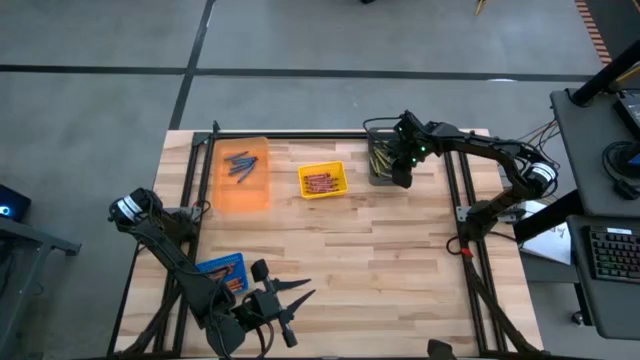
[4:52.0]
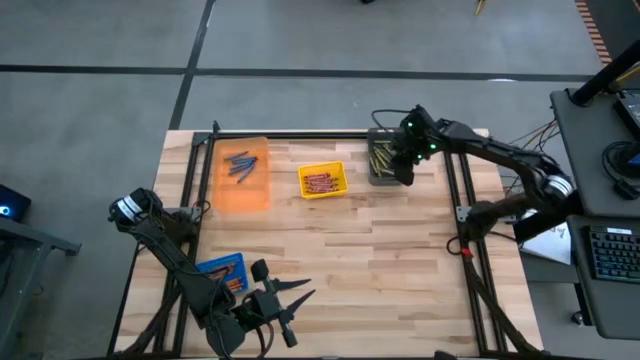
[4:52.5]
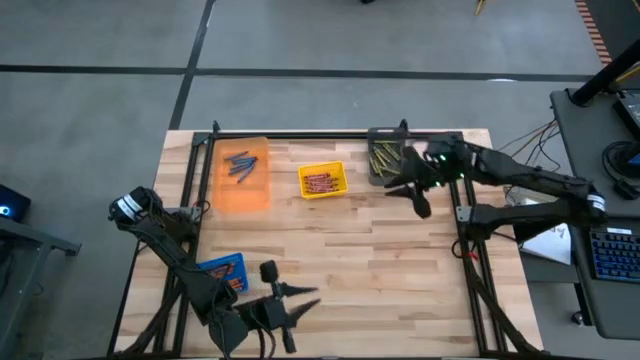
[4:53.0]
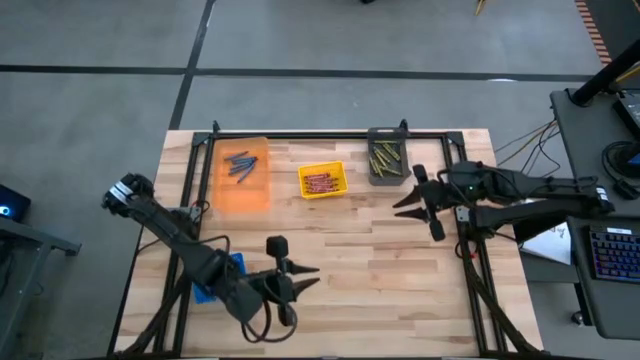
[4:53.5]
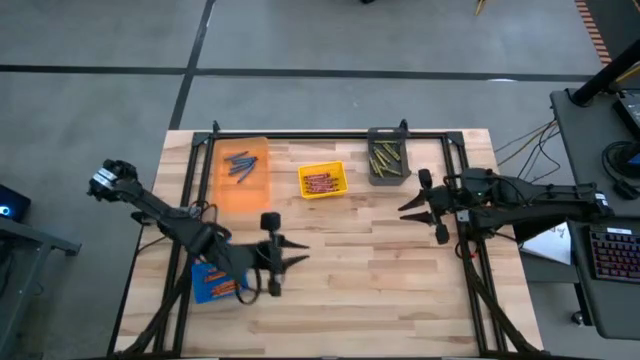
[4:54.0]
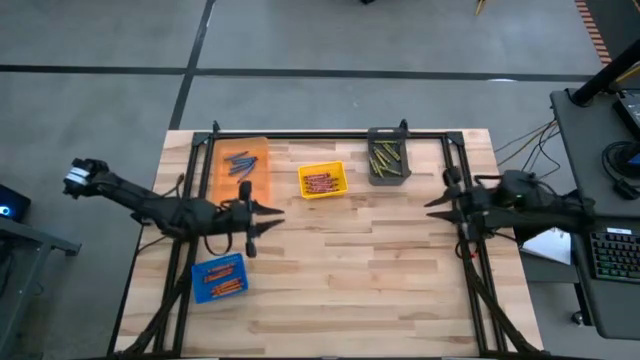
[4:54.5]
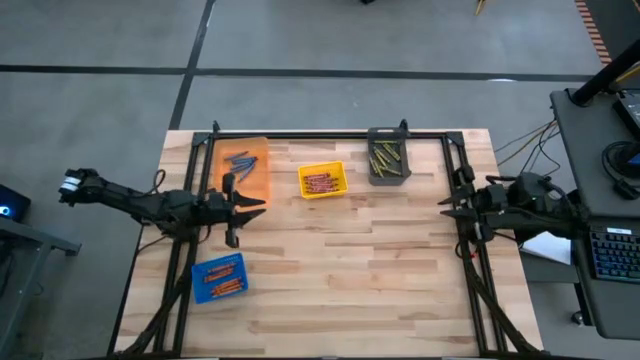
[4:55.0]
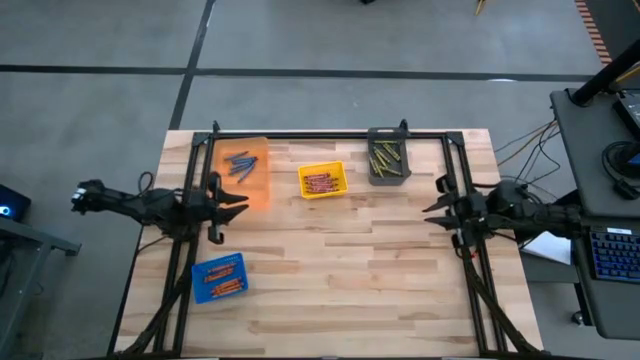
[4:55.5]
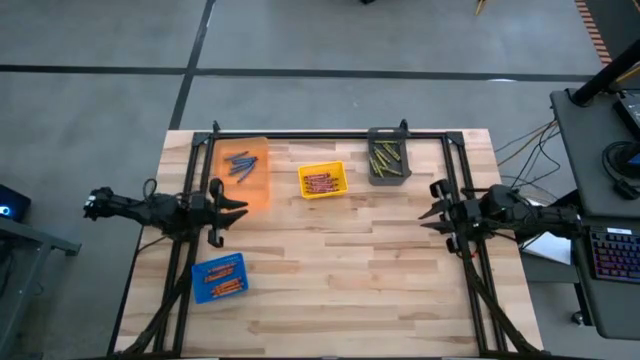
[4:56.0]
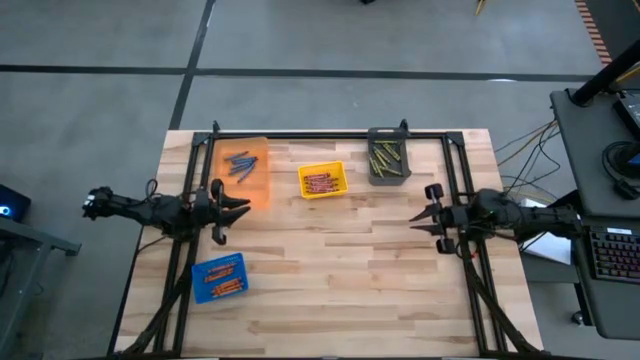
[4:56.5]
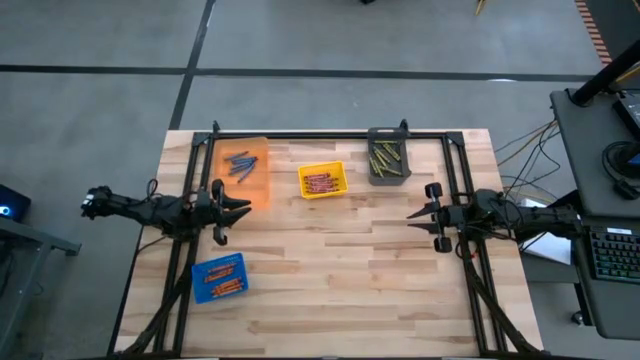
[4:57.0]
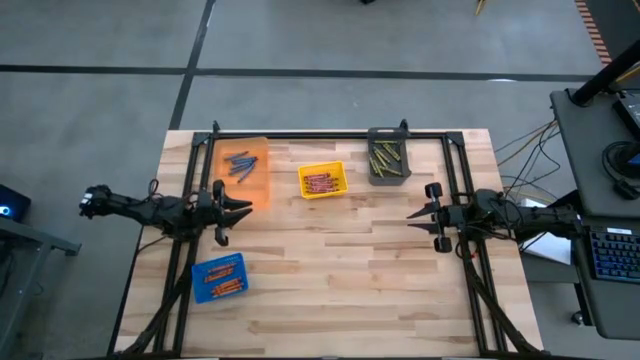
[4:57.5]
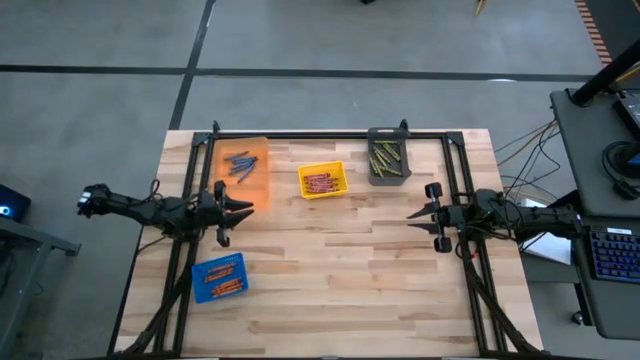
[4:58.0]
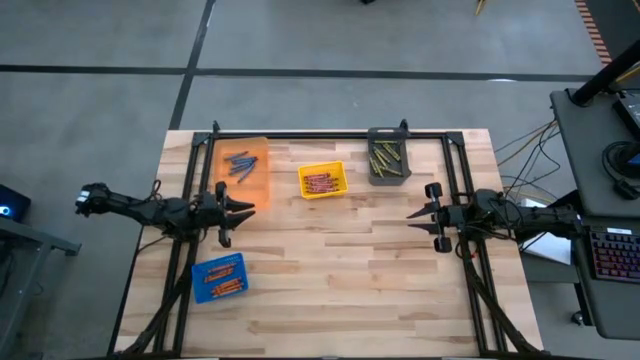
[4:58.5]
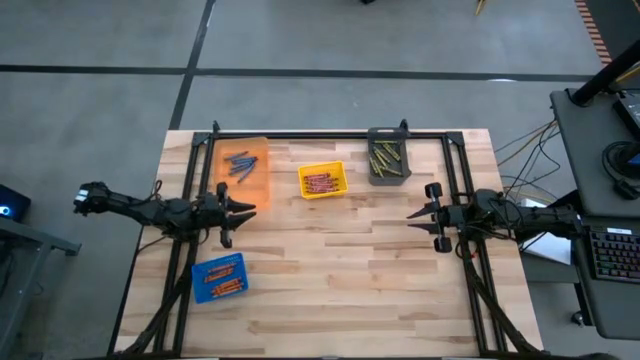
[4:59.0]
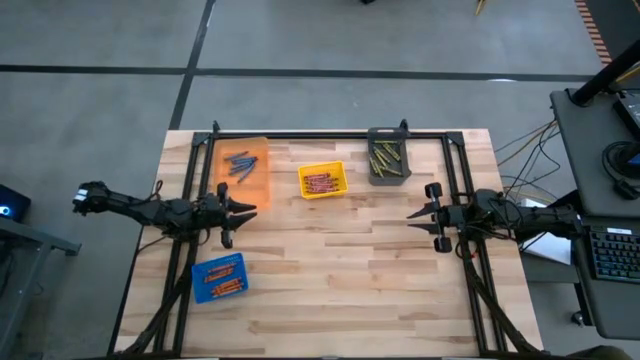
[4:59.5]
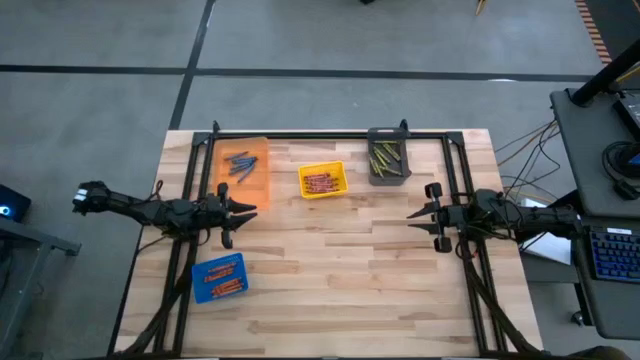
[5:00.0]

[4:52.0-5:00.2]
Task: Sort crayons
Return to Home Position
